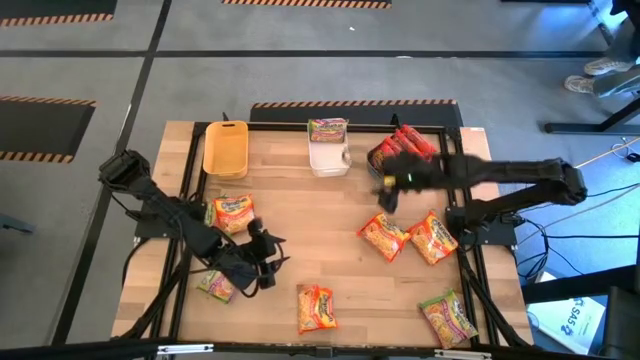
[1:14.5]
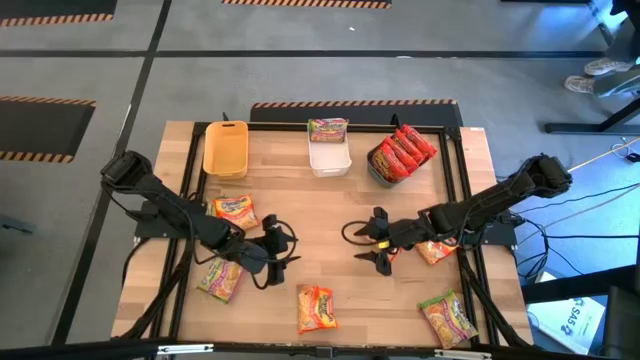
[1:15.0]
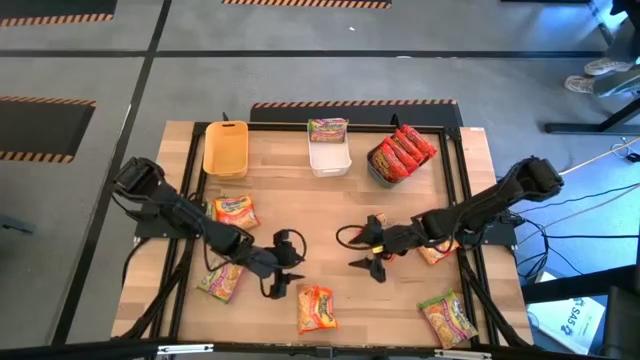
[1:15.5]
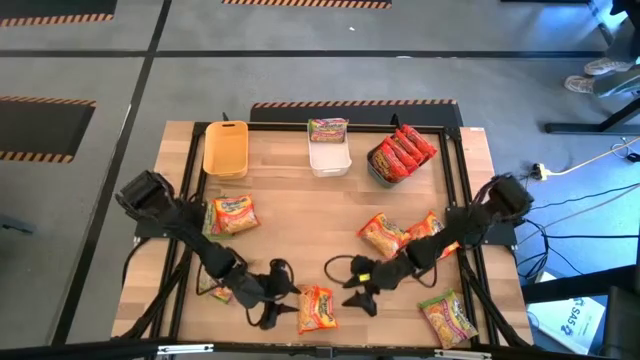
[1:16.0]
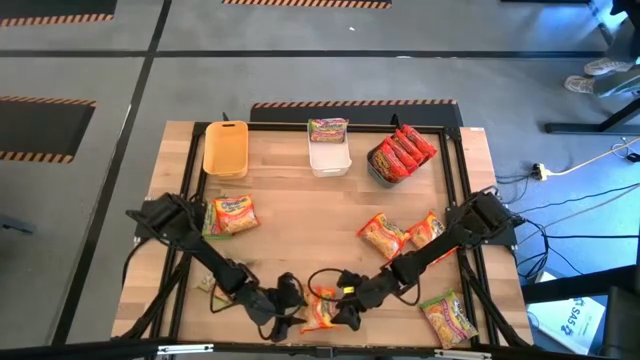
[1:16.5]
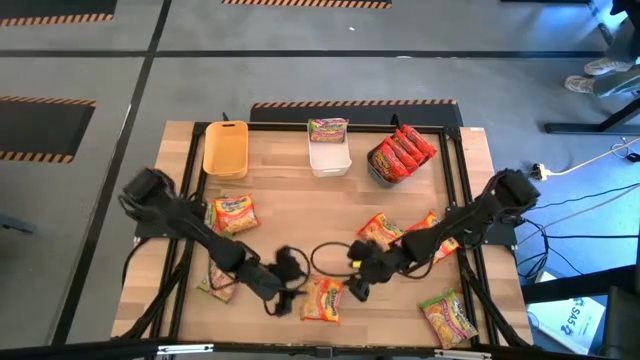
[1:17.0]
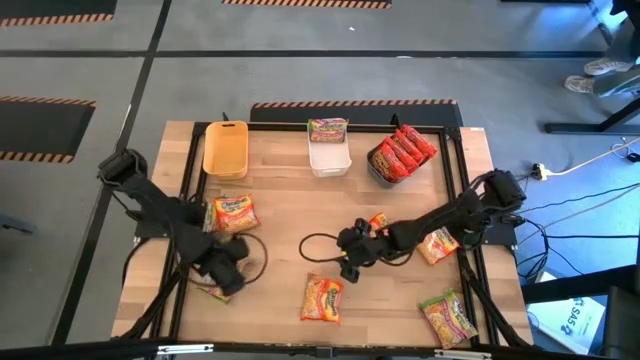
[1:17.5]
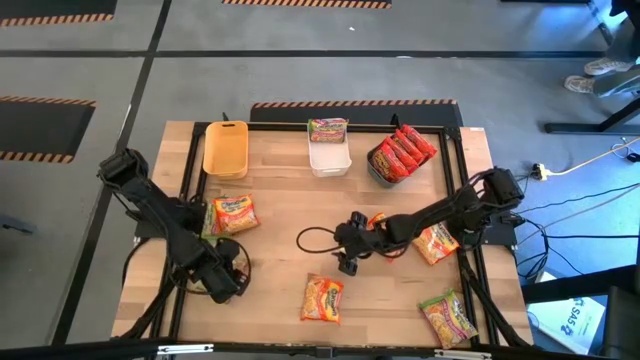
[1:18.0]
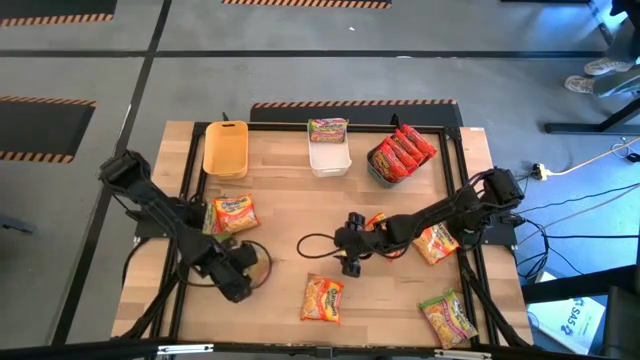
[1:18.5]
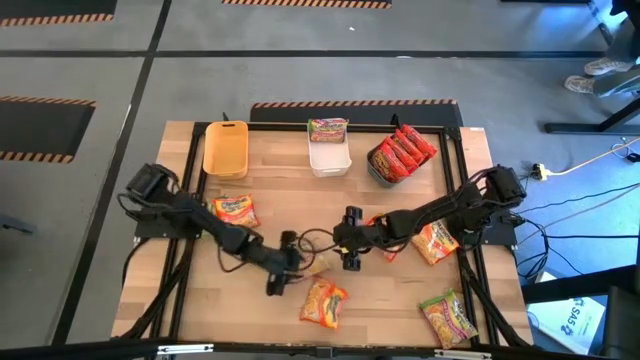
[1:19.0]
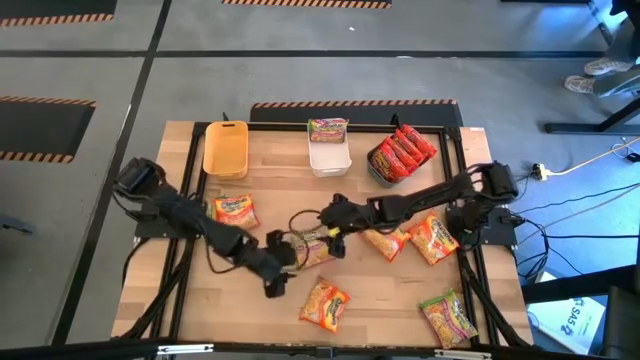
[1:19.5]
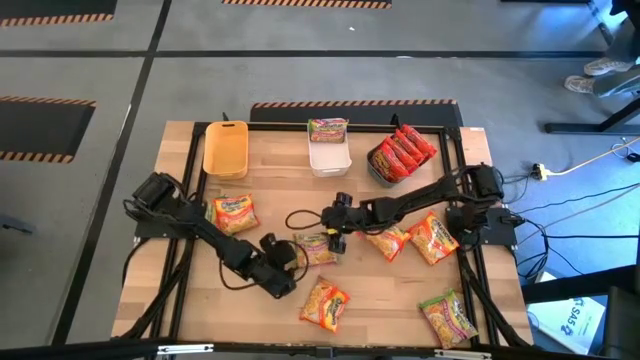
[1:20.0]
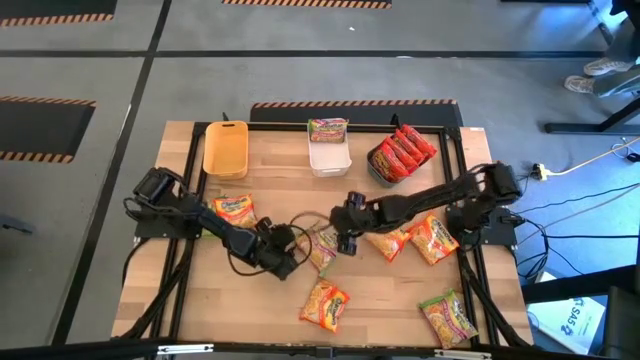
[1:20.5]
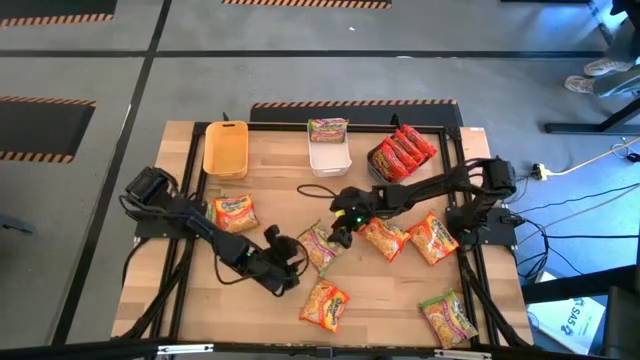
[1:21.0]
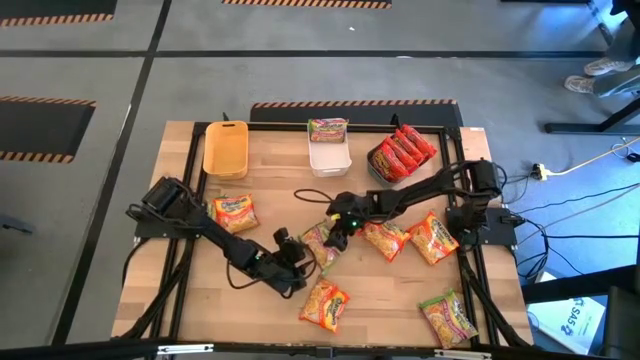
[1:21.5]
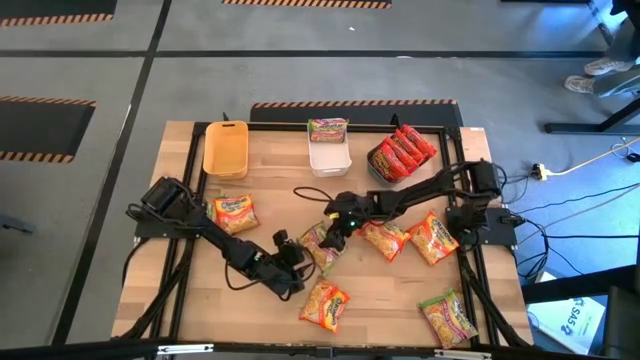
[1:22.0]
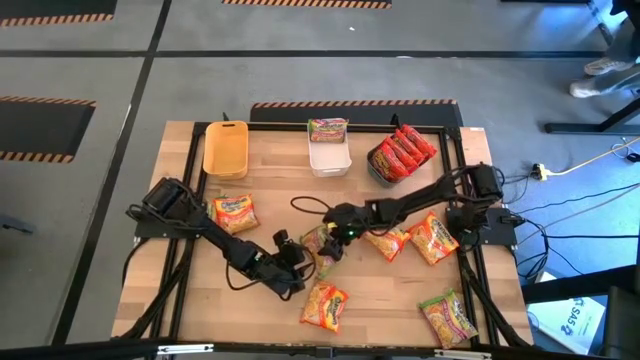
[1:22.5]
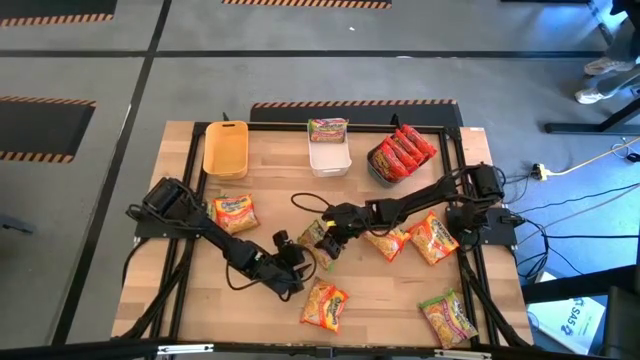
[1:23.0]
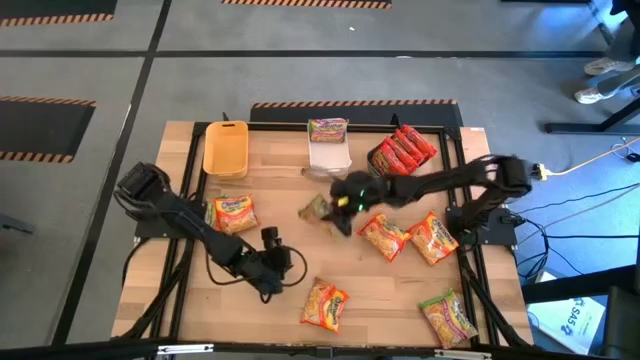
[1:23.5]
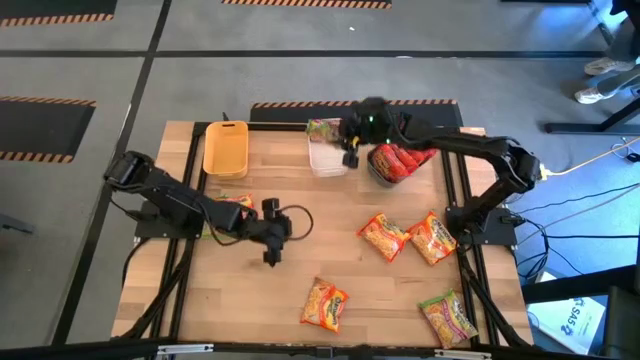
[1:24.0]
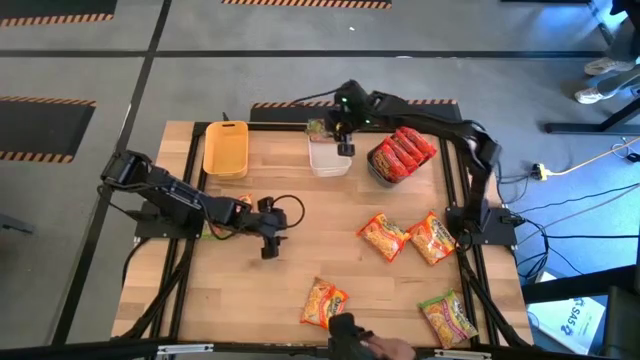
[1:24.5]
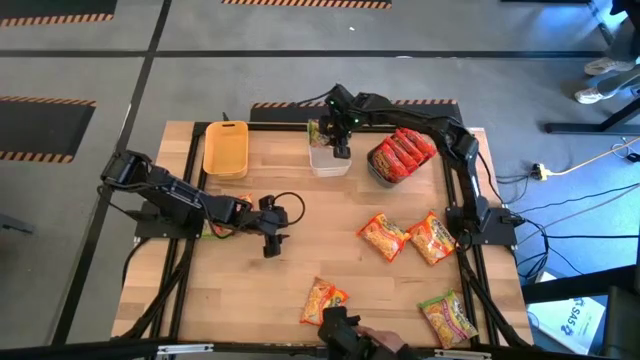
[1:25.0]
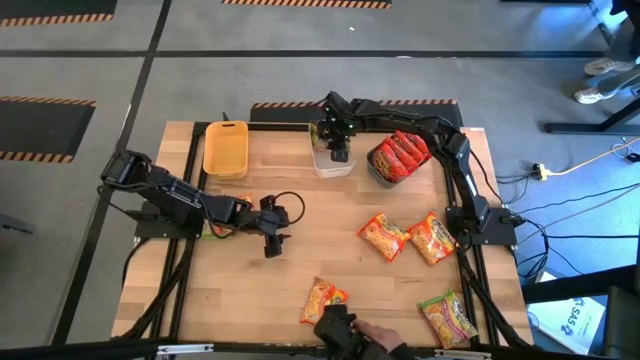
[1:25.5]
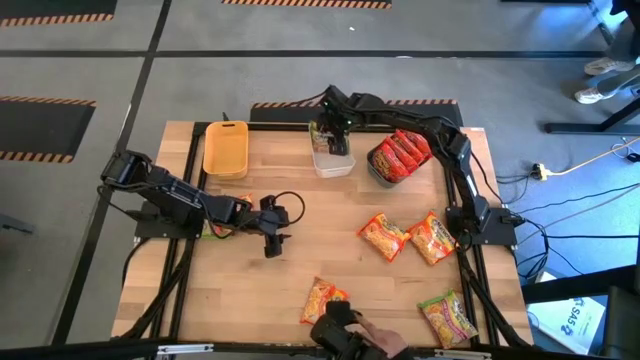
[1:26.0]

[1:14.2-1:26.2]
Task: Sort Maruchan noodles
Put the green noodle pack into the white bin

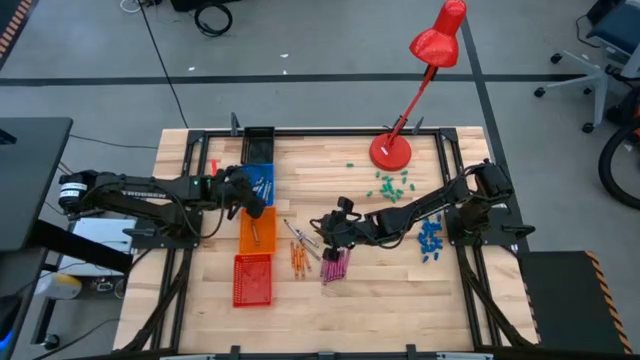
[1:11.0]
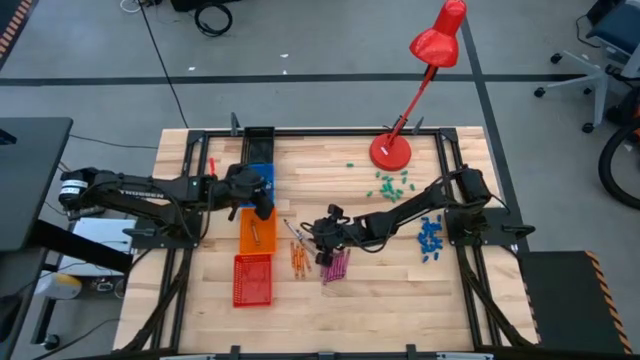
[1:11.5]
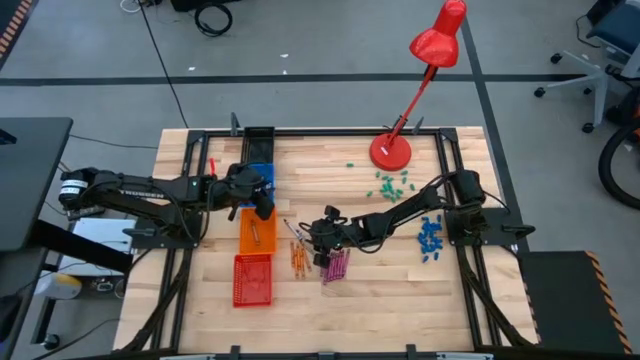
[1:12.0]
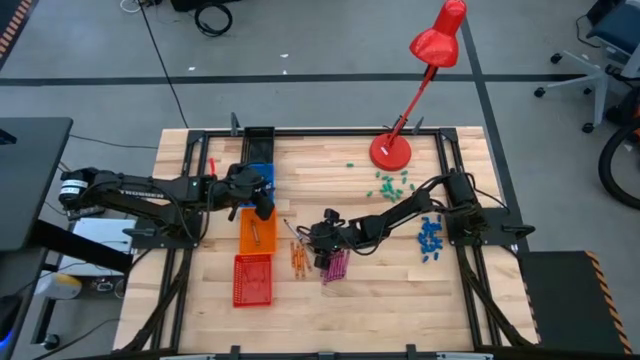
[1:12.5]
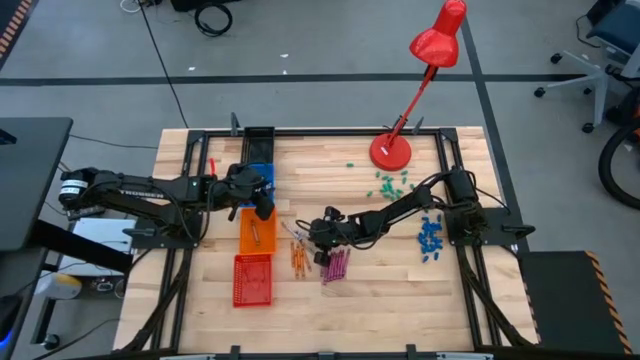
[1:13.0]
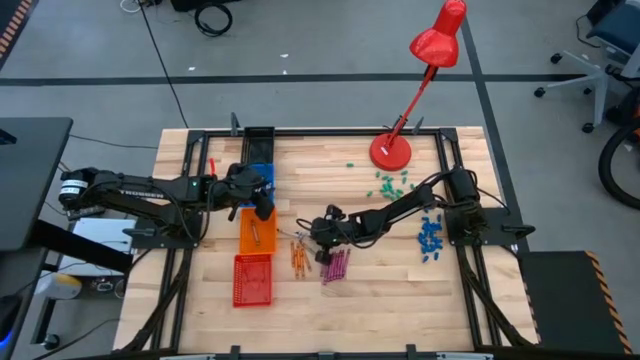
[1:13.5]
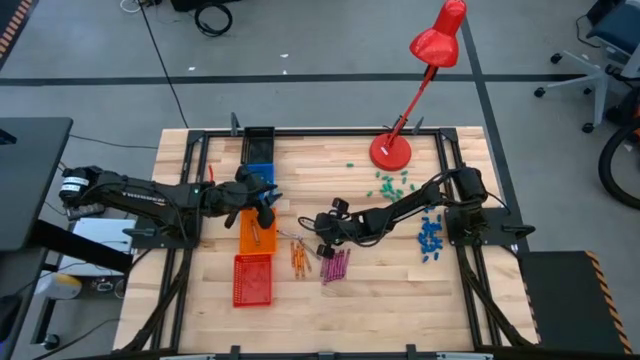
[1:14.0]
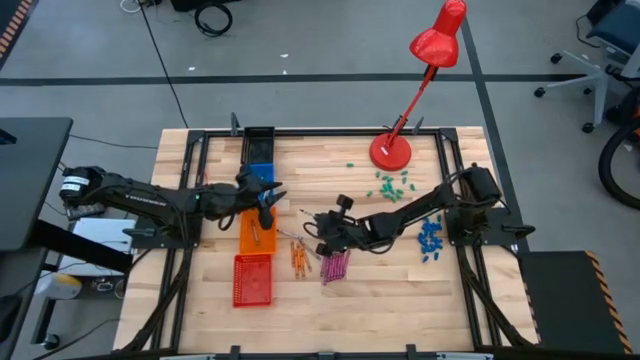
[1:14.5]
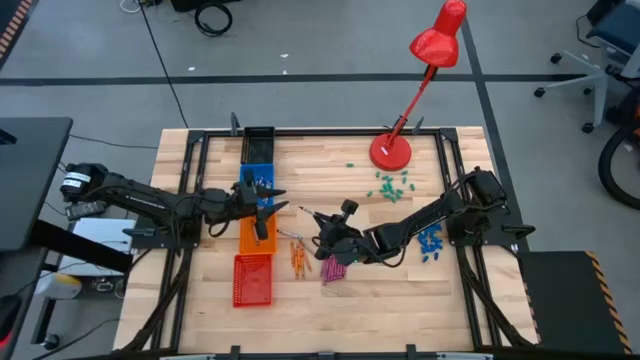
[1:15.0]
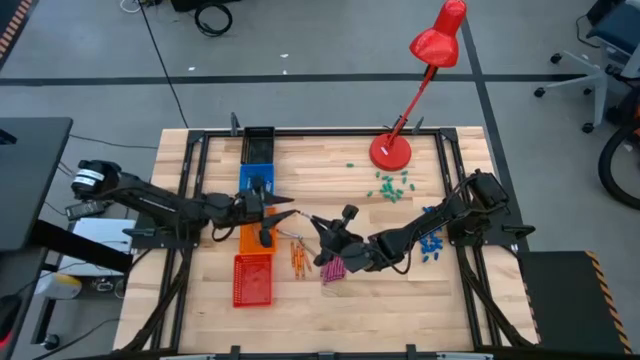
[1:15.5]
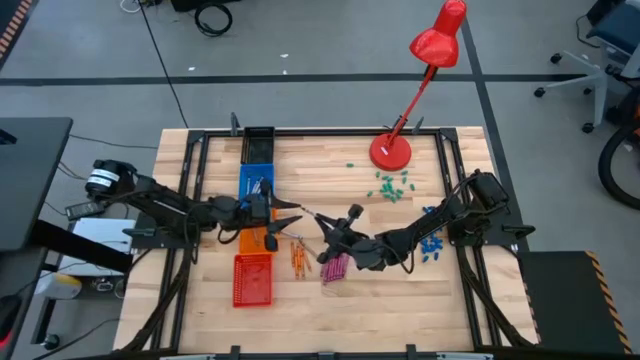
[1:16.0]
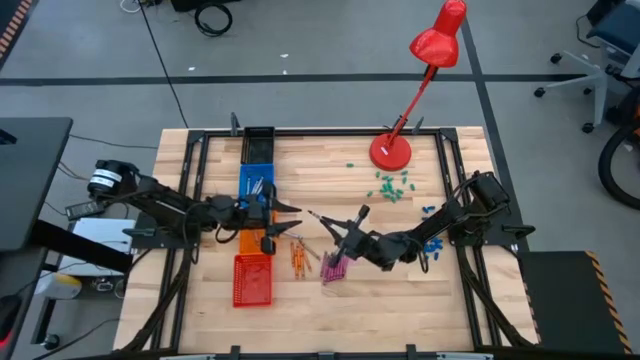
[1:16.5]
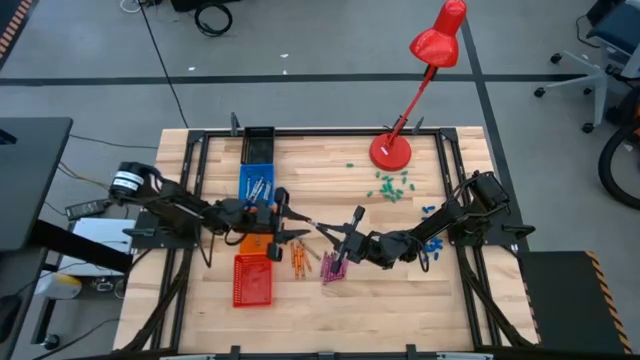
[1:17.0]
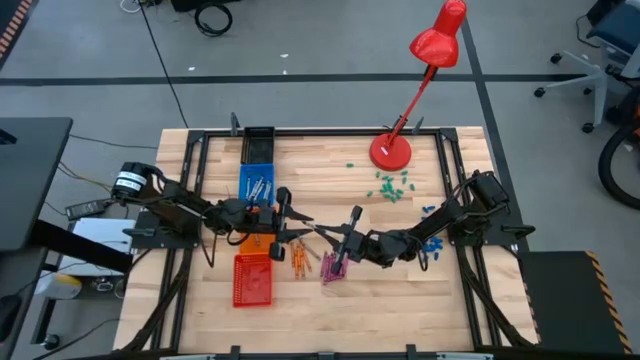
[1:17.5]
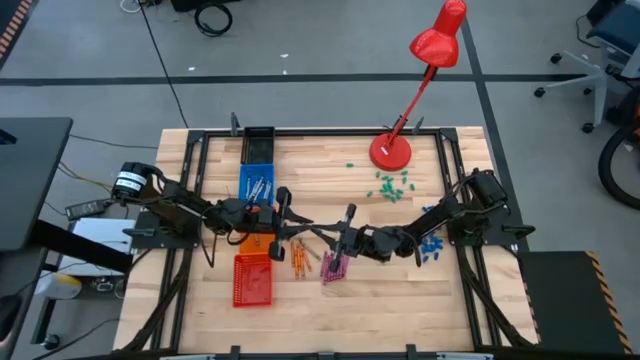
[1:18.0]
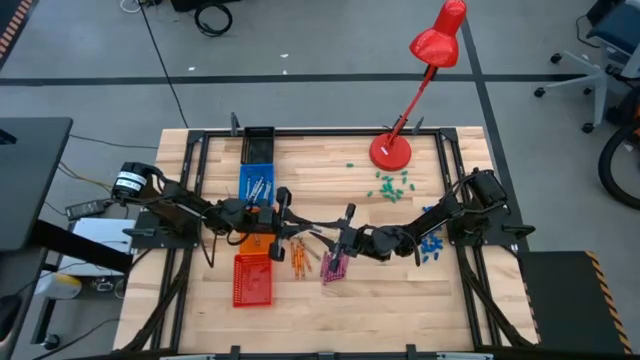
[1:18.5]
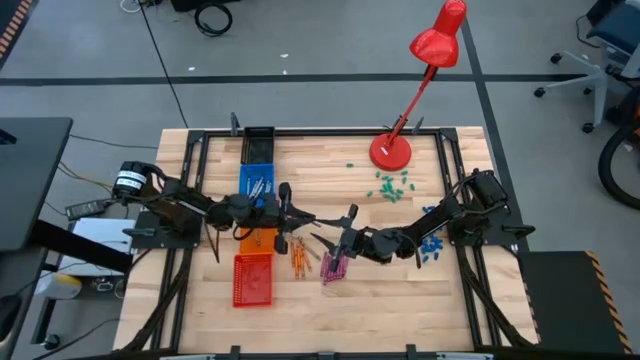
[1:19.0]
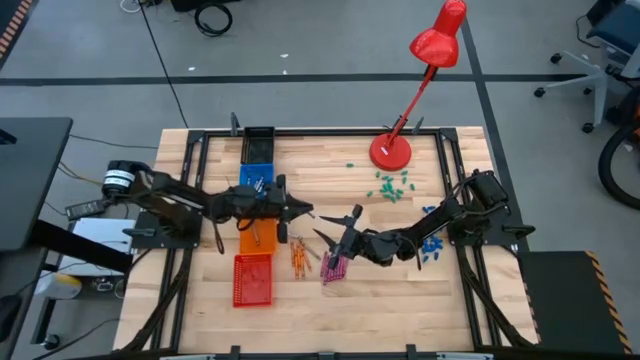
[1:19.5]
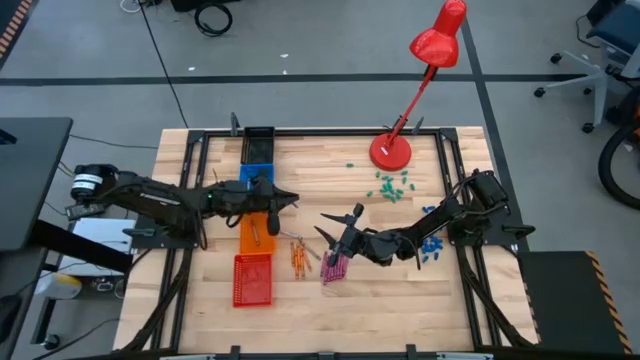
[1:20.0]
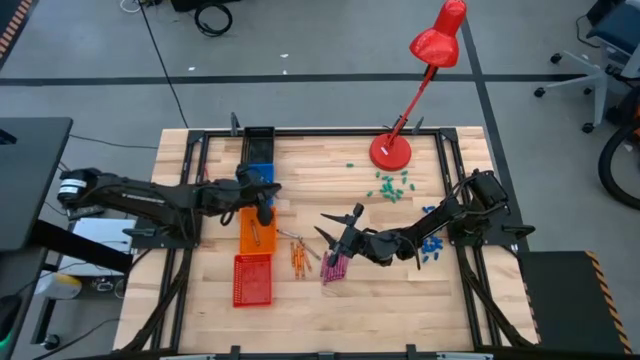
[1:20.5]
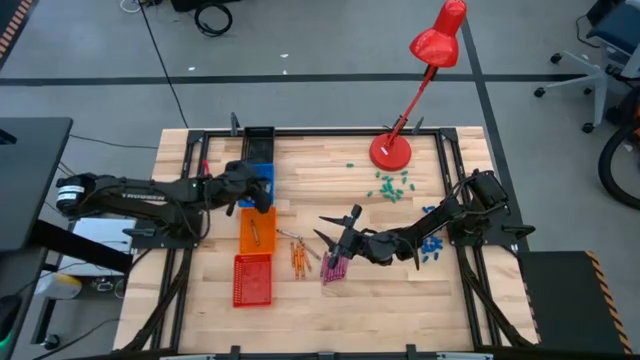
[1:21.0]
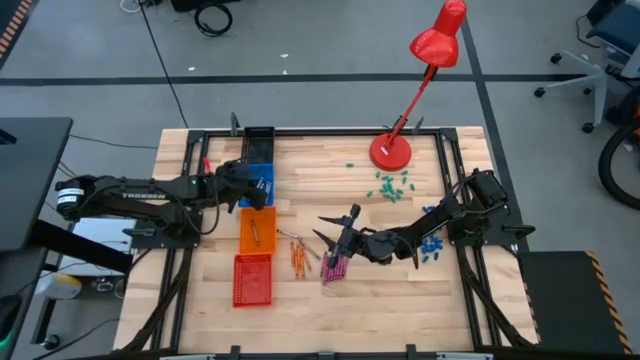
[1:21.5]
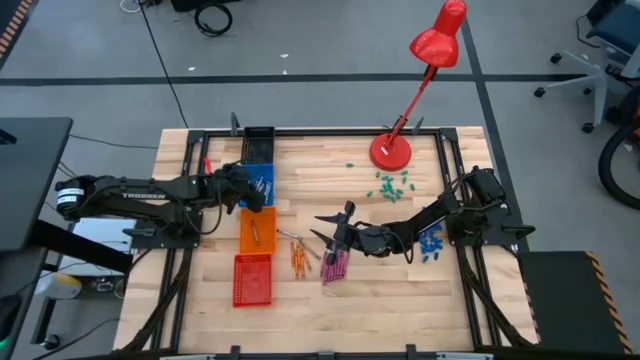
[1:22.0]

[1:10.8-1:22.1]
Task: Sort crayons
Put the black crayon into the blue bin
